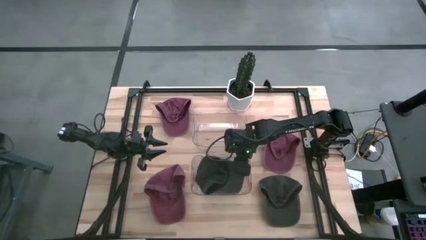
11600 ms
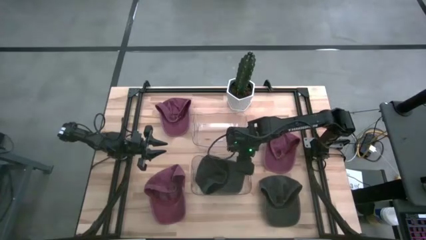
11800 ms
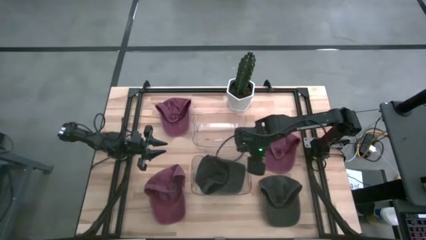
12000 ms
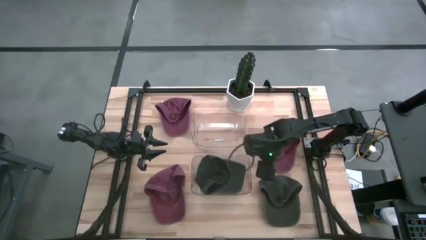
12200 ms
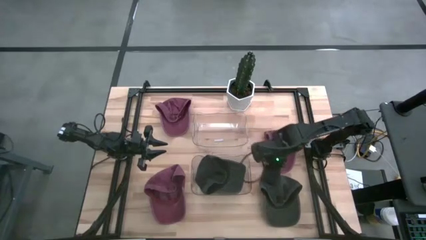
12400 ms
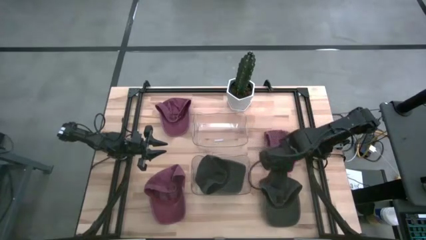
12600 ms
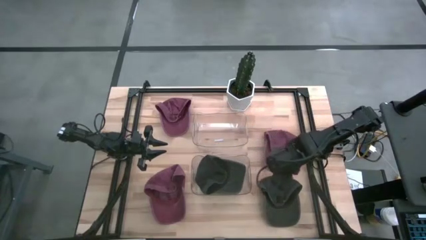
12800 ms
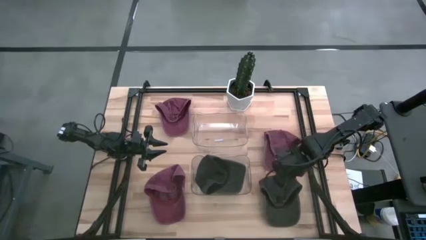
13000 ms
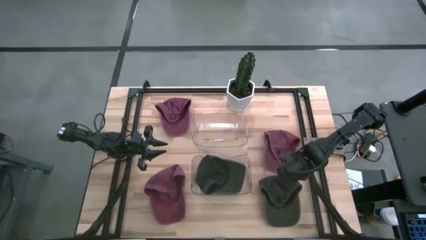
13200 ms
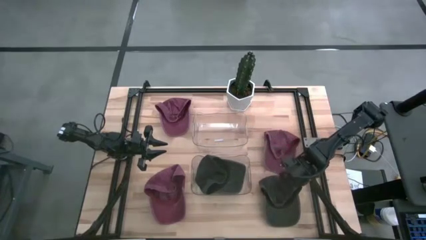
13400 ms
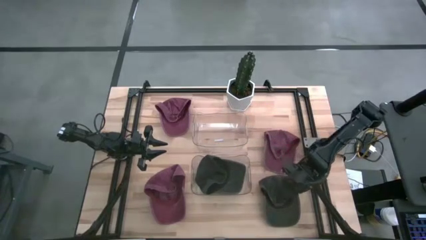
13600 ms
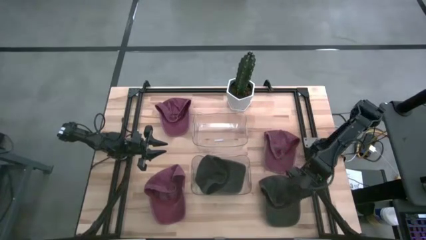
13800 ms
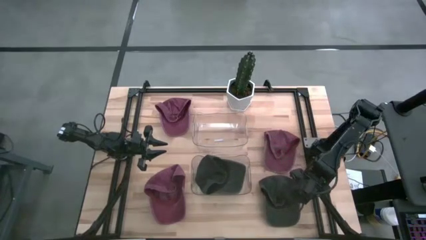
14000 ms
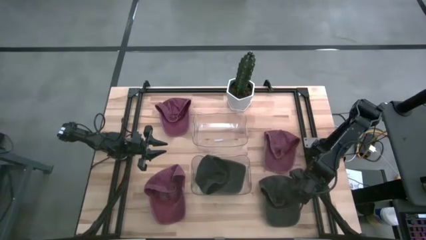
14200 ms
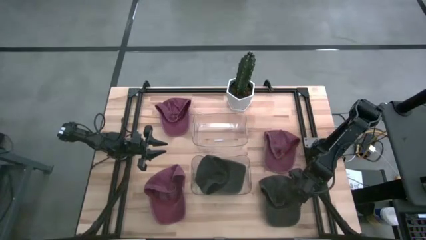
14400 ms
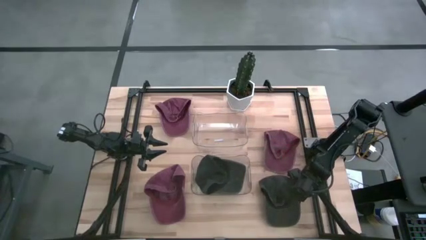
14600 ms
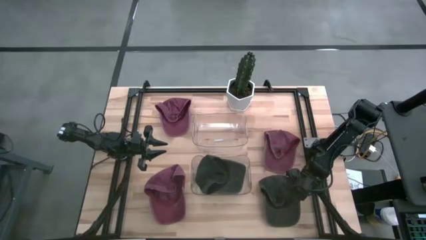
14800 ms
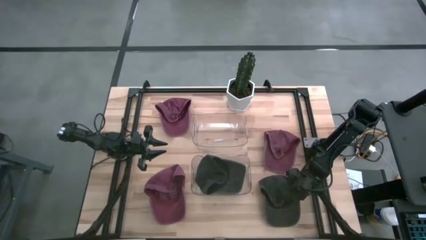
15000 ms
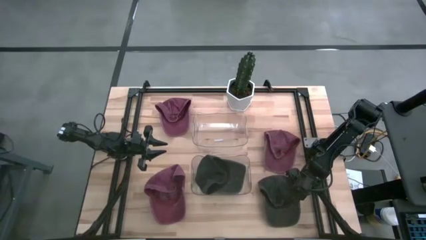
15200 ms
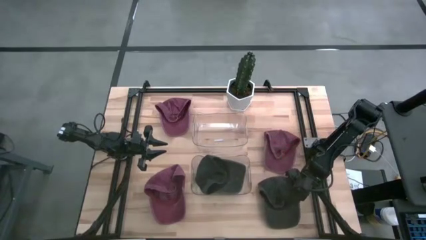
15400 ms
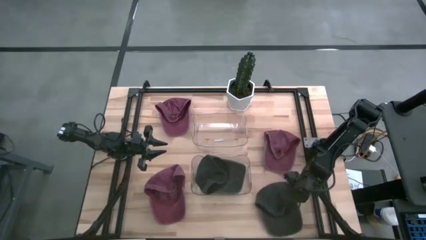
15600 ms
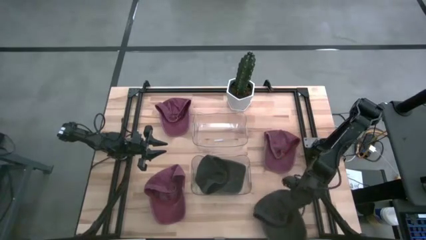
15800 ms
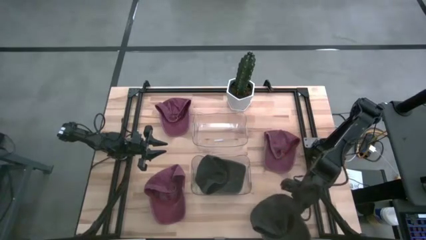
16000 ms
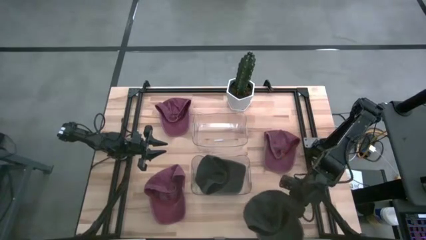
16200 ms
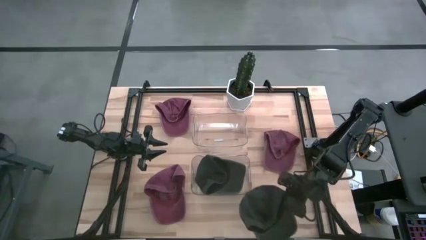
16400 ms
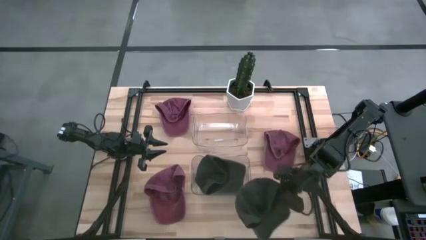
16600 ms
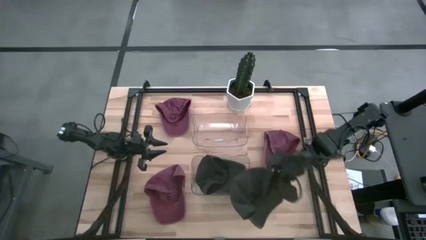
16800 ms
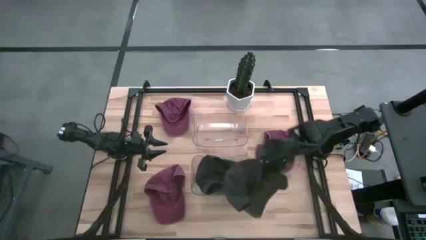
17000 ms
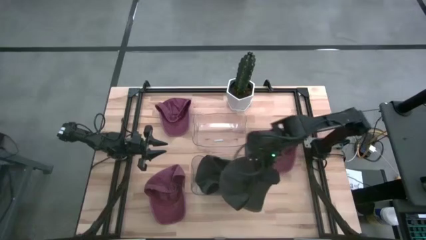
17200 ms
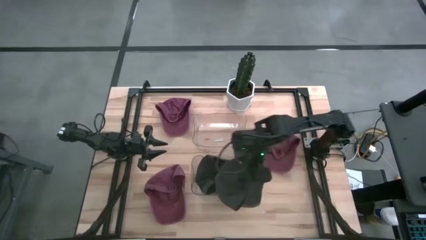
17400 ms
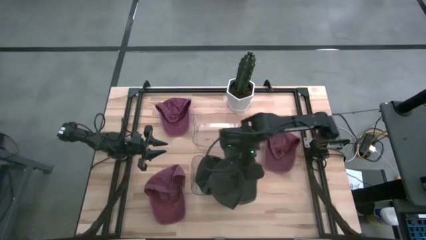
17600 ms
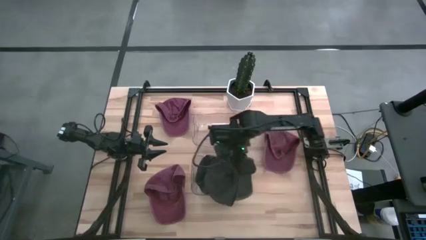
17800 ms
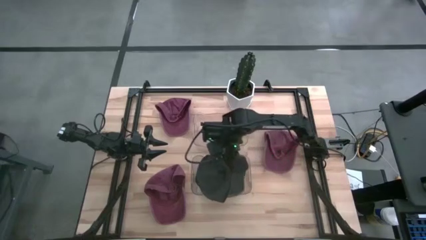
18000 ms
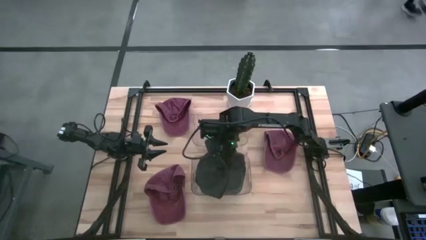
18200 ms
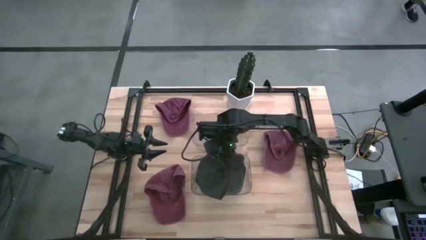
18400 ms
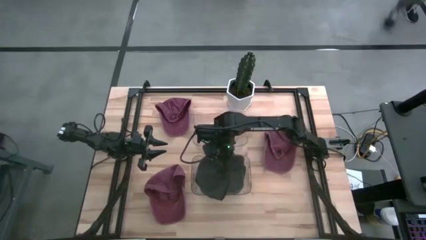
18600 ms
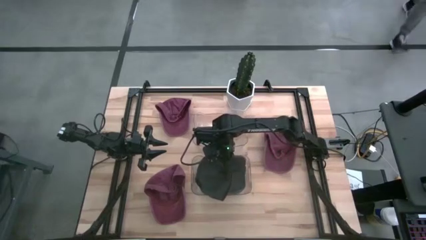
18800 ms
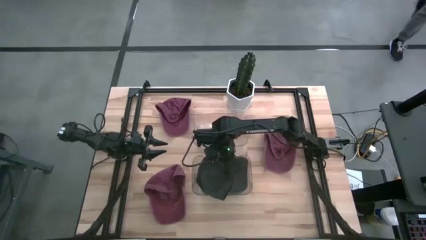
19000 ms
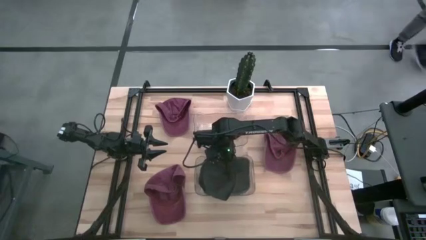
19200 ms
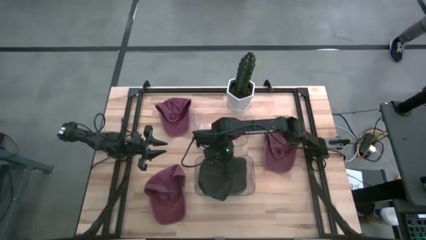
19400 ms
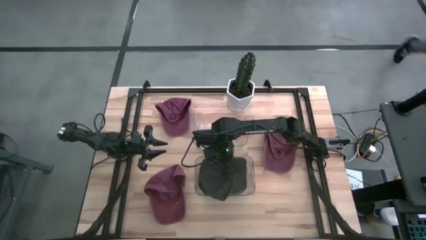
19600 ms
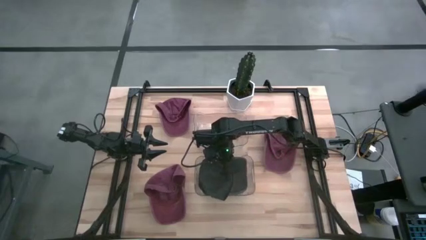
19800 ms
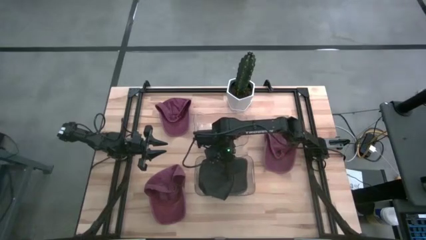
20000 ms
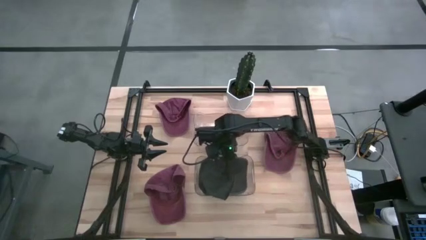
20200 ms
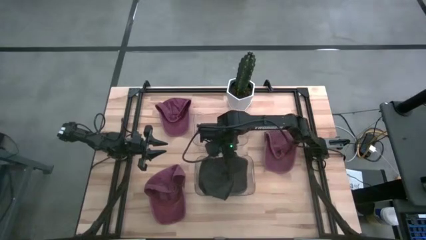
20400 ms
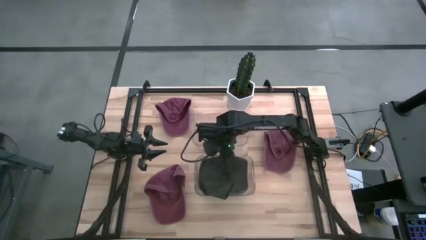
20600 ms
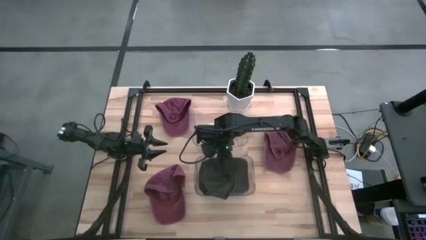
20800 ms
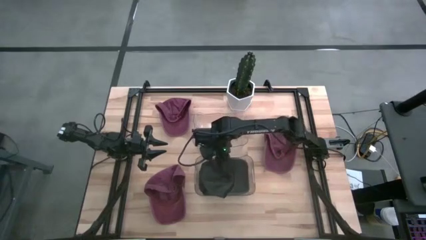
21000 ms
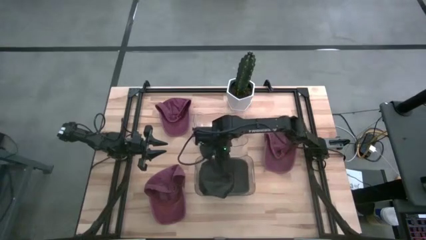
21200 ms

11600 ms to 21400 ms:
Task: Pick & Place hat
Put the black cap into the bottom transparent bin

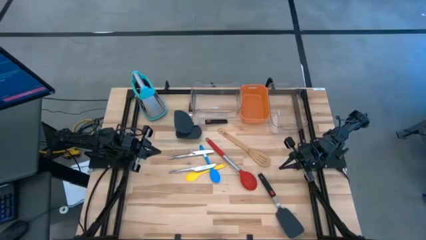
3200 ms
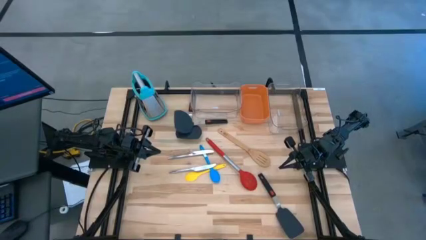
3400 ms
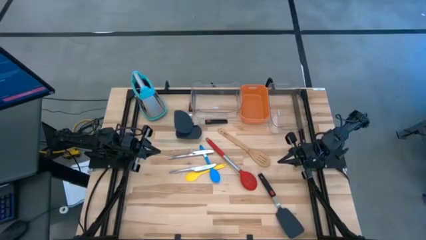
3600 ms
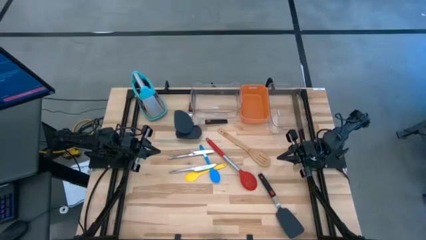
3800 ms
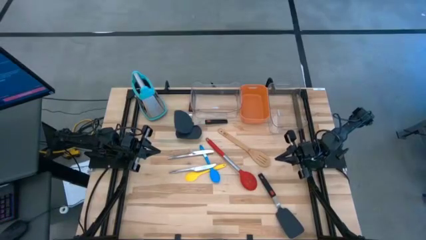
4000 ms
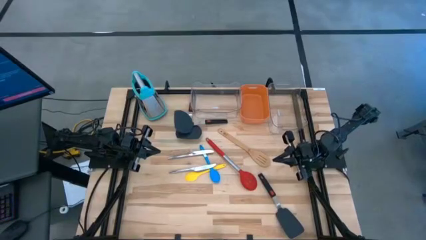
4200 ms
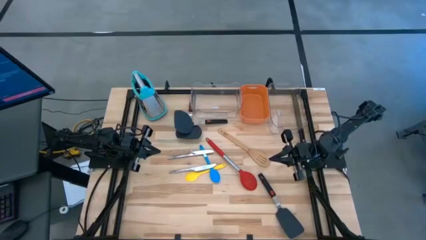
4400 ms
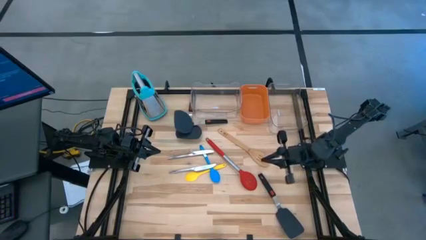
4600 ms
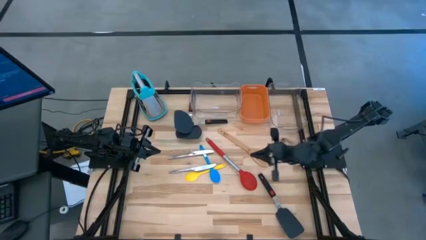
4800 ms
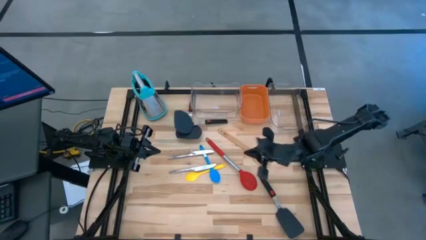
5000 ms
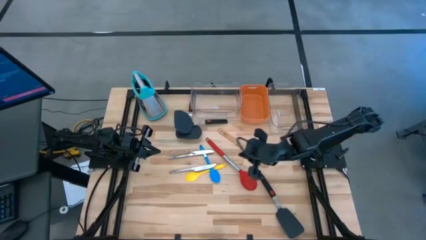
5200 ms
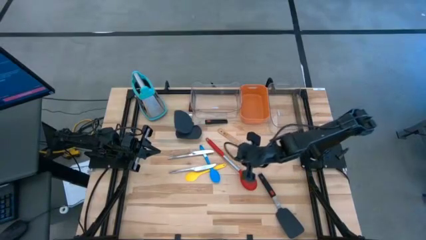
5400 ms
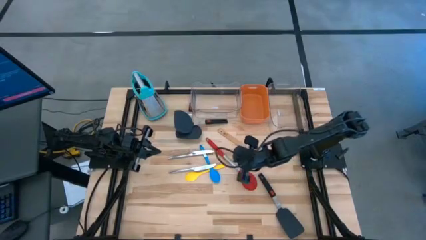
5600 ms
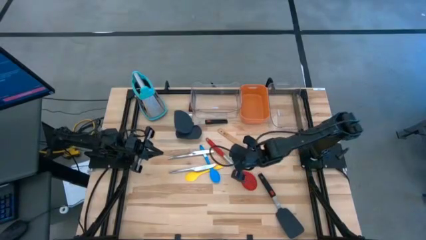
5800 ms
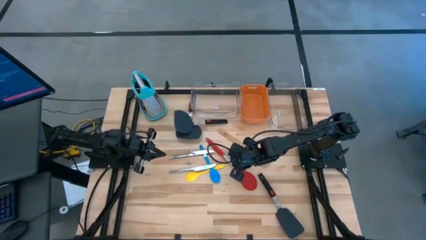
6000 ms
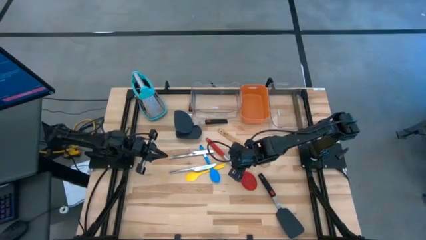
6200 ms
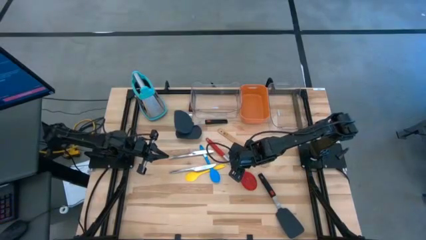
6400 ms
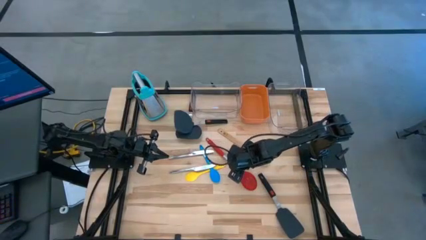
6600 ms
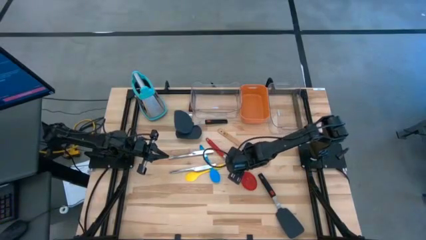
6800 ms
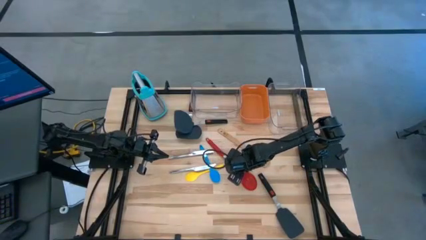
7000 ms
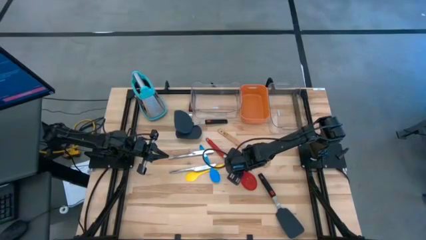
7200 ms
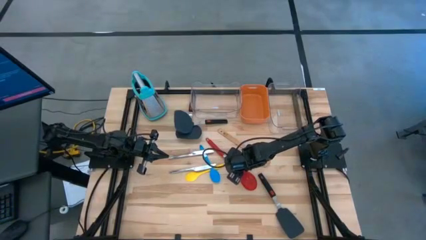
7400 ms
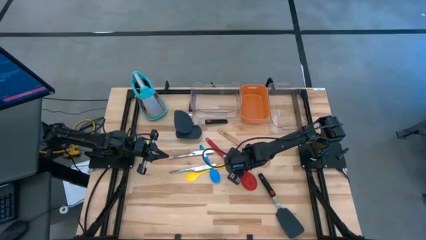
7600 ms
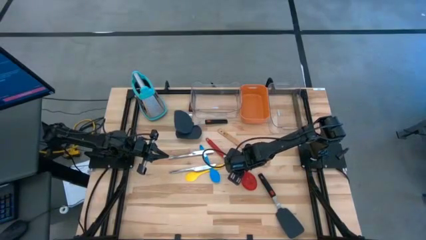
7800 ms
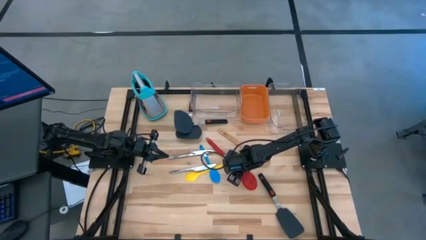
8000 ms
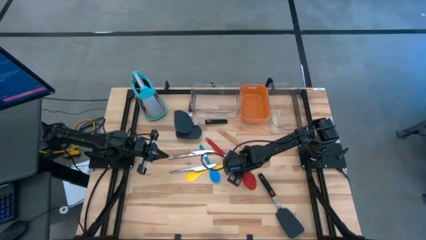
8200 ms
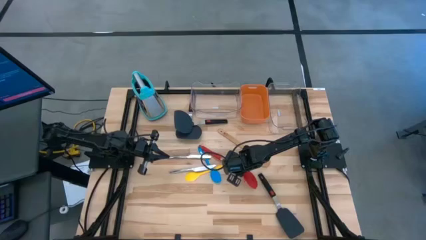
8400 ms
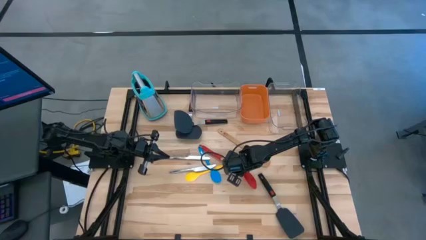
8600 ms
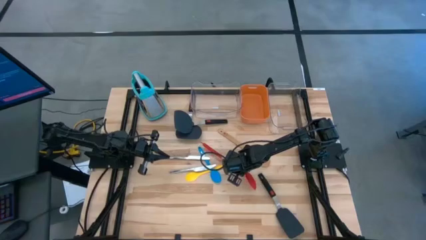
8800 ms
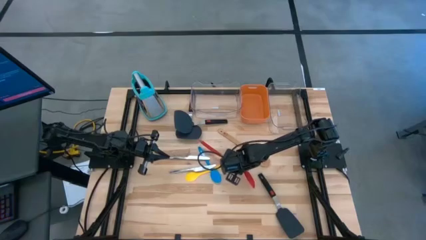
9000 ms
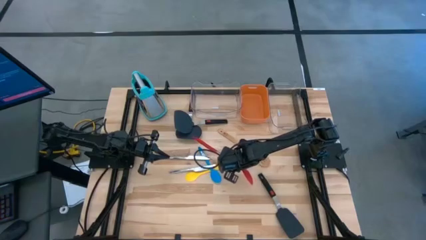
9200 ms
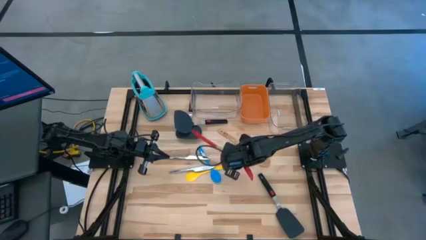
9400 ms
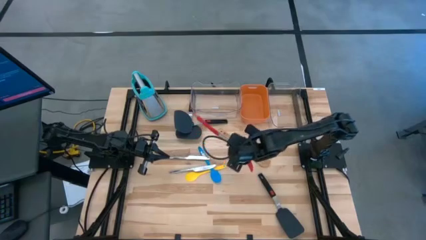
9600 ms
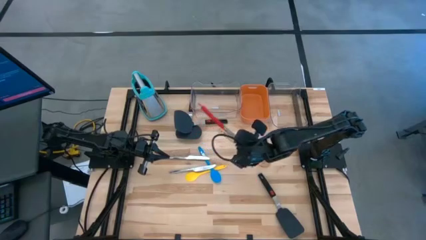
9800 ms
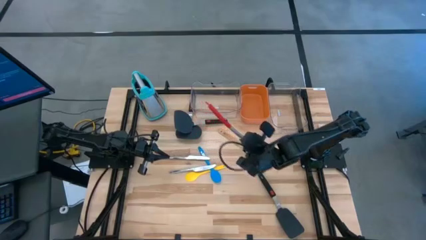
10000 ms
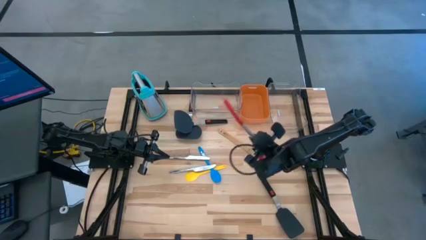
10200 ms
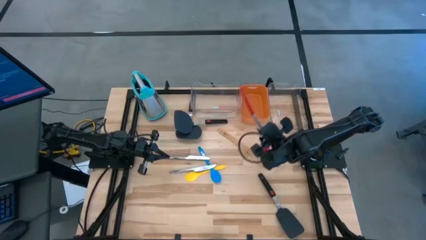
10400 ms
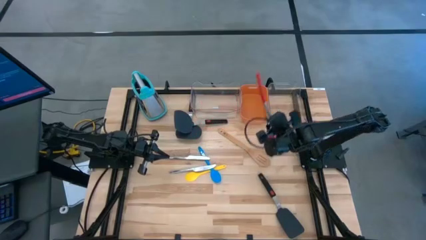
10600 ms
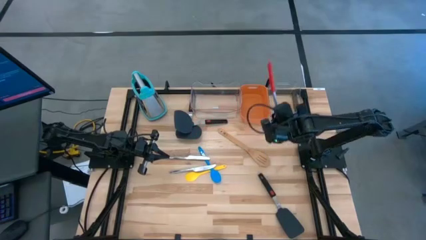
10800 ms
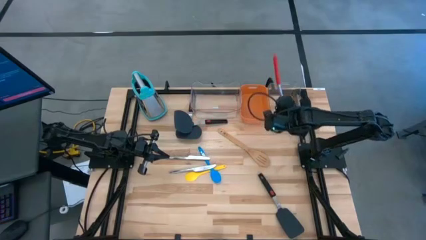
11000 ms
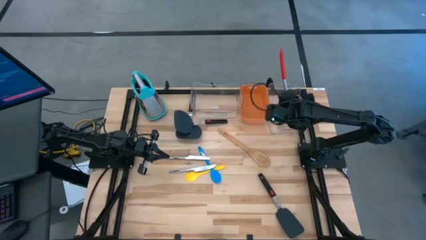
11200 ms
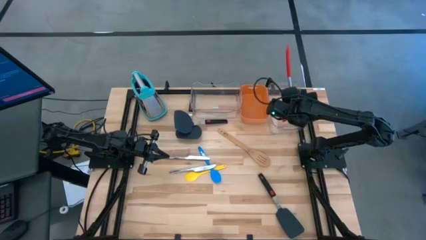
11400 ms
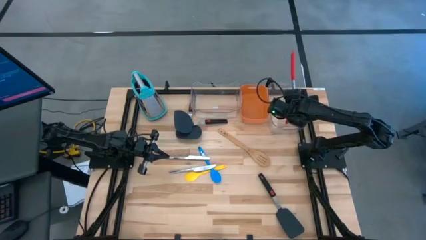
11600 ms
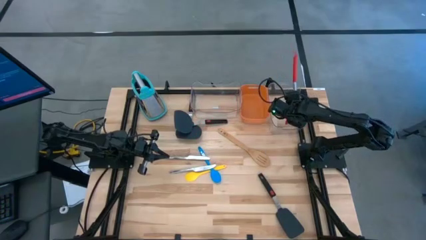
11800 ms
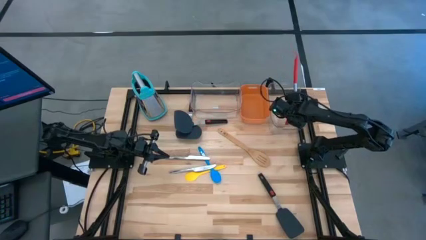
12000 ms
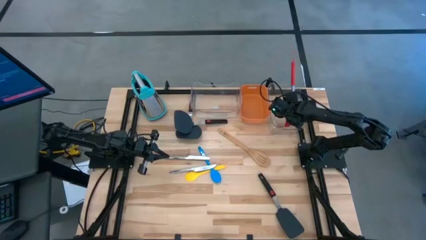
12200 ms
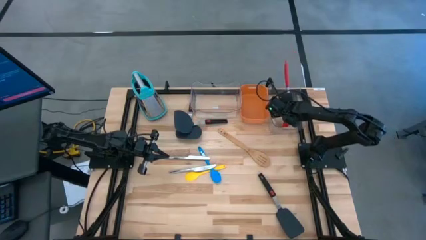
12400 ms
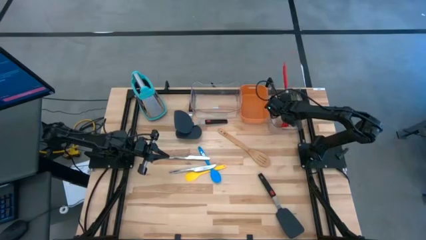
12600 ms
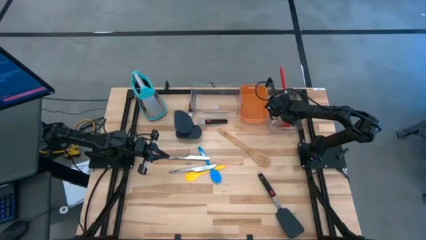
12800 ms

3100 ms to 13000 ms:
Task: Pick & Place Kitchen Items
Put the red slotted spatula in the right transparent bin
